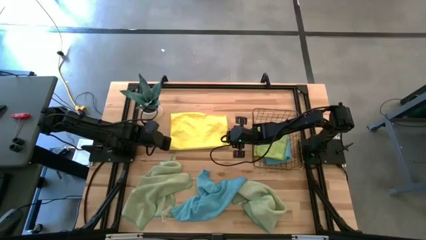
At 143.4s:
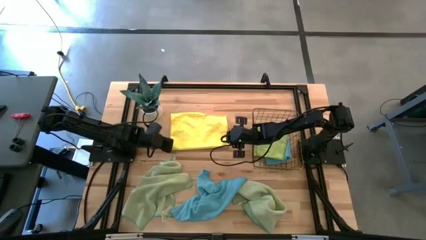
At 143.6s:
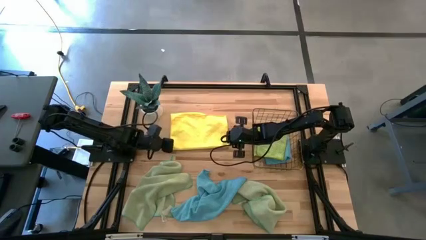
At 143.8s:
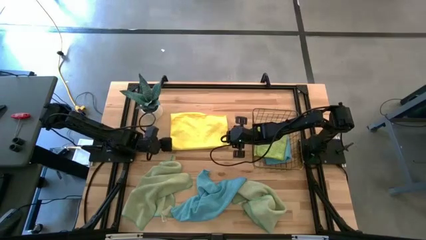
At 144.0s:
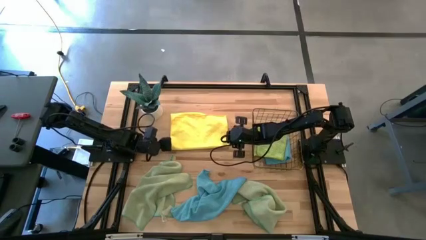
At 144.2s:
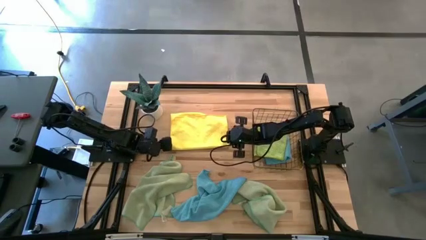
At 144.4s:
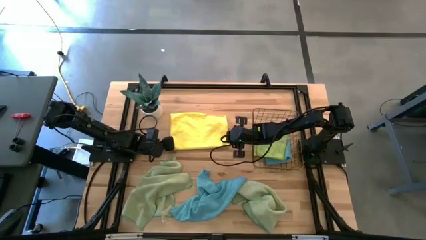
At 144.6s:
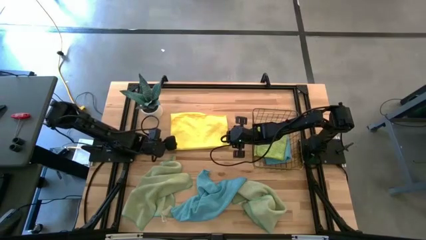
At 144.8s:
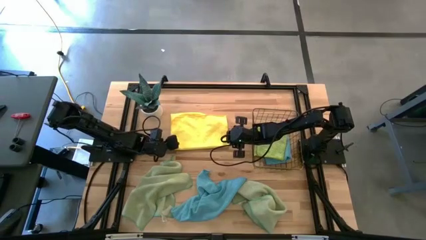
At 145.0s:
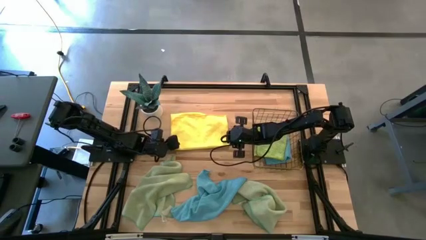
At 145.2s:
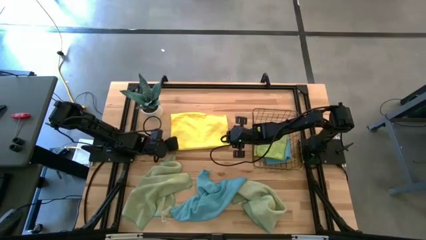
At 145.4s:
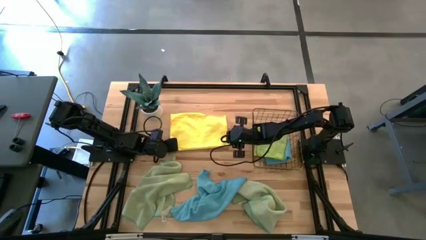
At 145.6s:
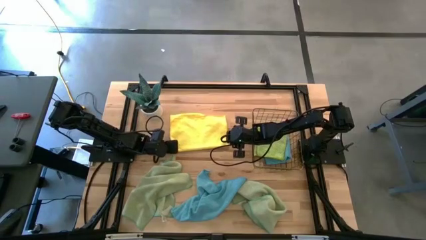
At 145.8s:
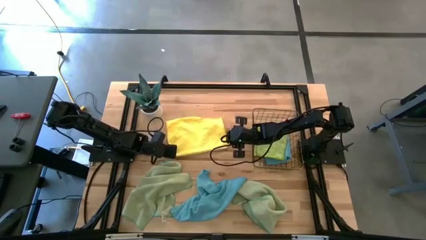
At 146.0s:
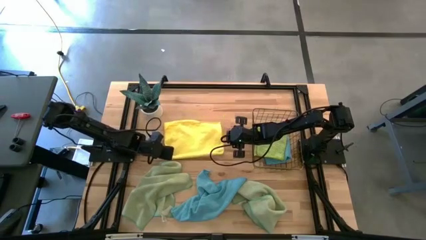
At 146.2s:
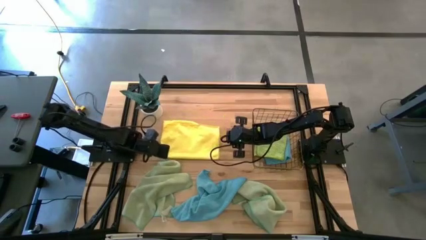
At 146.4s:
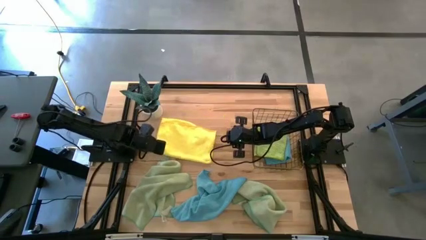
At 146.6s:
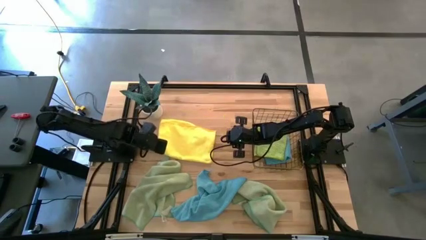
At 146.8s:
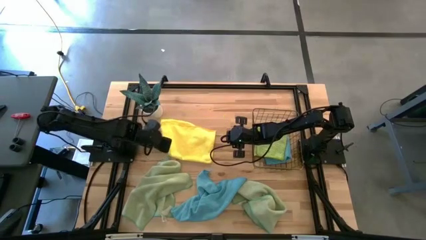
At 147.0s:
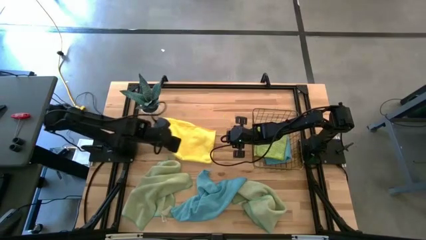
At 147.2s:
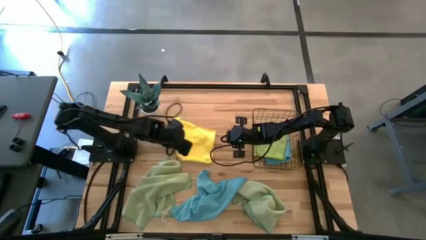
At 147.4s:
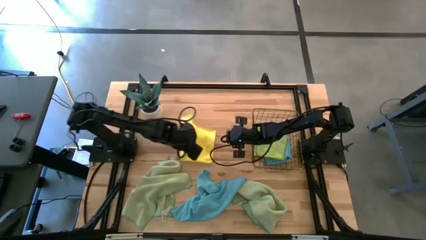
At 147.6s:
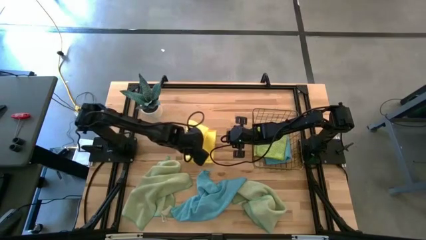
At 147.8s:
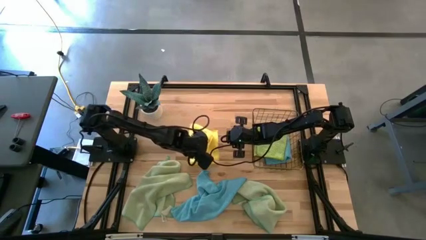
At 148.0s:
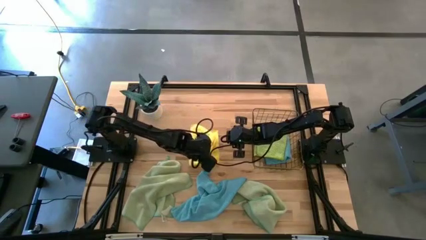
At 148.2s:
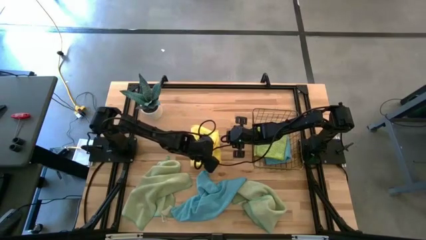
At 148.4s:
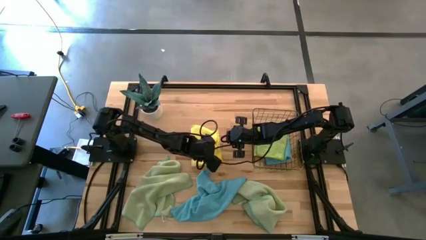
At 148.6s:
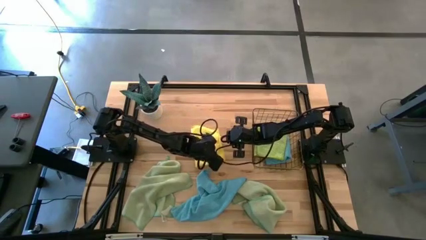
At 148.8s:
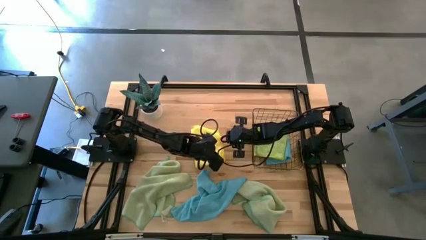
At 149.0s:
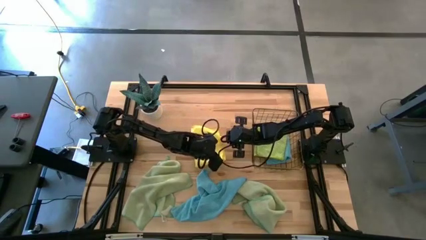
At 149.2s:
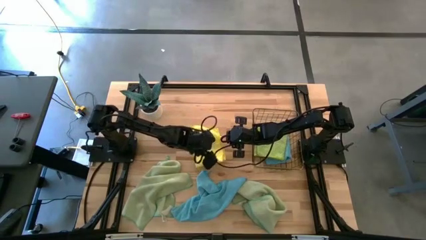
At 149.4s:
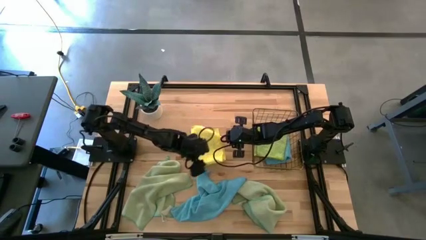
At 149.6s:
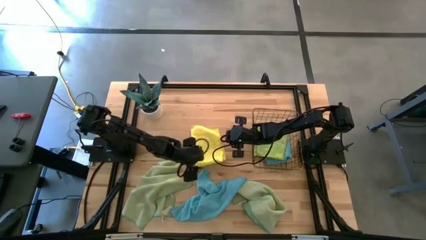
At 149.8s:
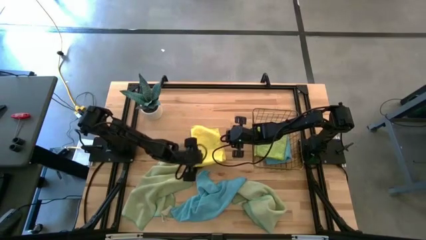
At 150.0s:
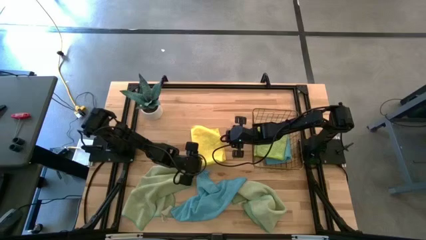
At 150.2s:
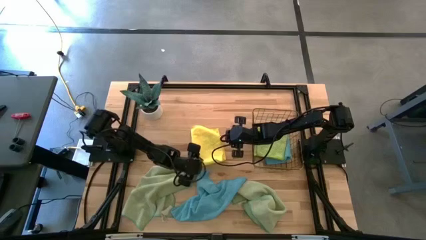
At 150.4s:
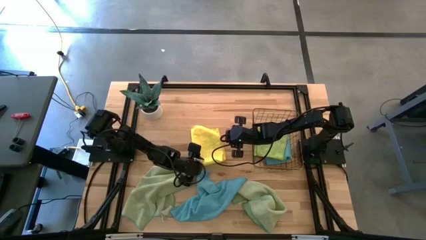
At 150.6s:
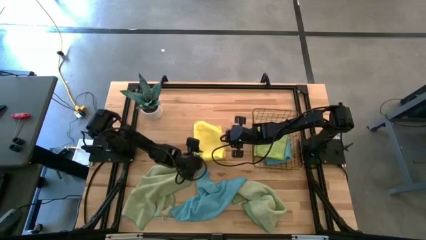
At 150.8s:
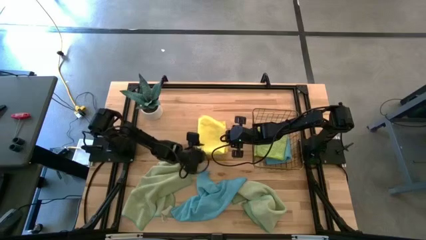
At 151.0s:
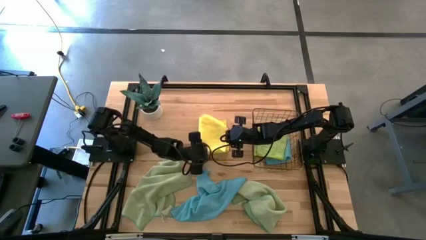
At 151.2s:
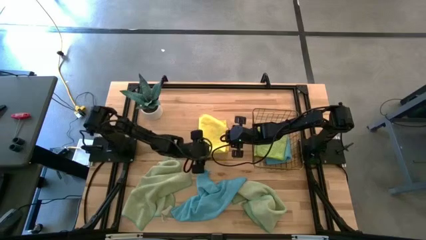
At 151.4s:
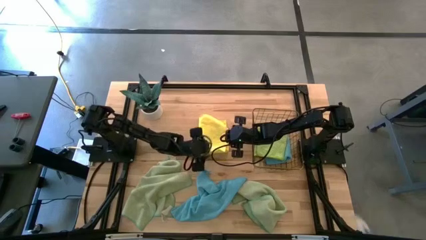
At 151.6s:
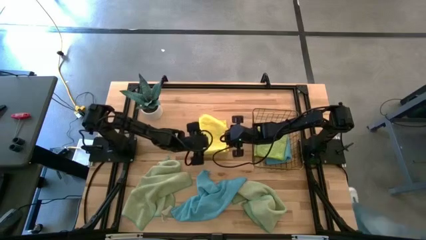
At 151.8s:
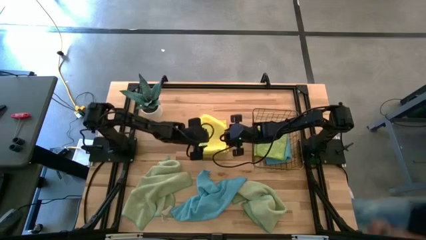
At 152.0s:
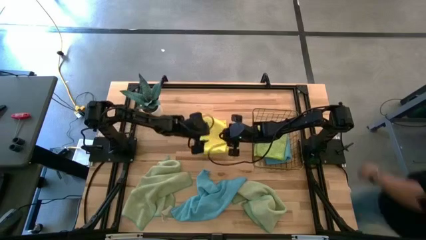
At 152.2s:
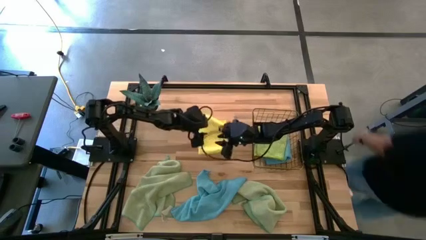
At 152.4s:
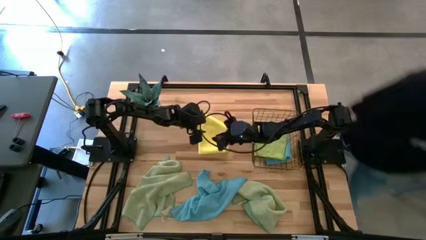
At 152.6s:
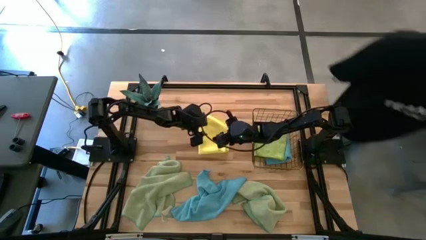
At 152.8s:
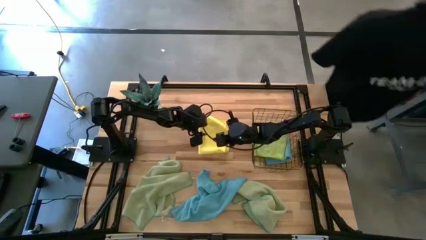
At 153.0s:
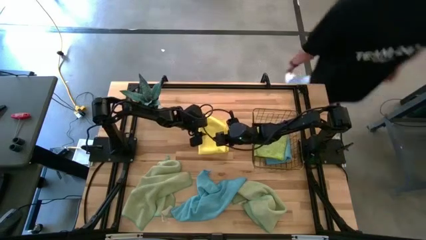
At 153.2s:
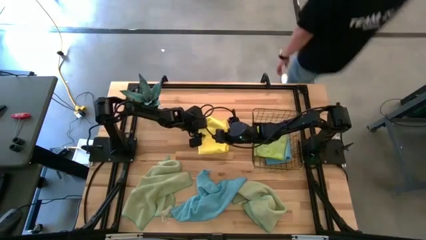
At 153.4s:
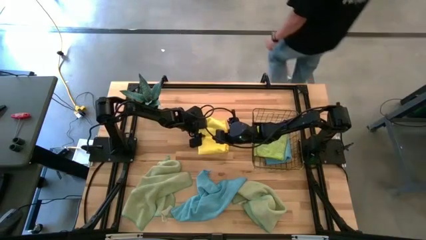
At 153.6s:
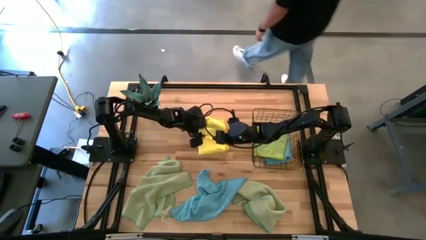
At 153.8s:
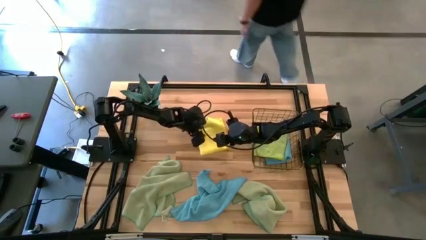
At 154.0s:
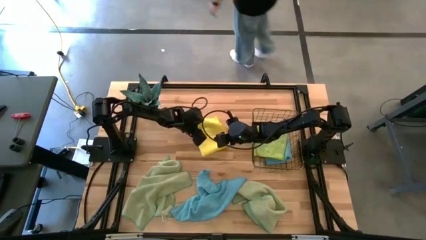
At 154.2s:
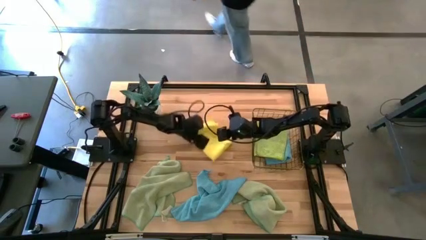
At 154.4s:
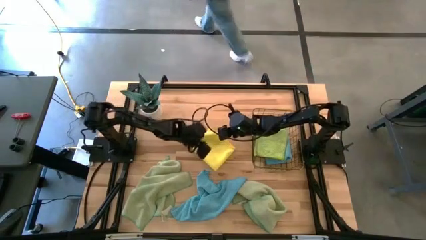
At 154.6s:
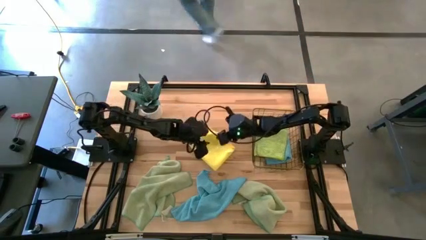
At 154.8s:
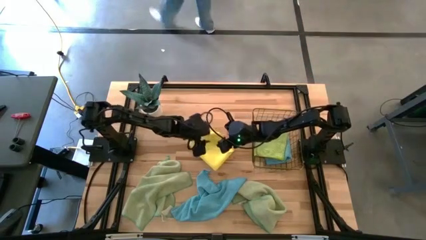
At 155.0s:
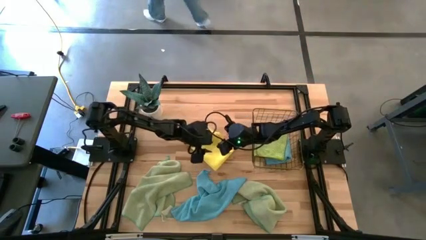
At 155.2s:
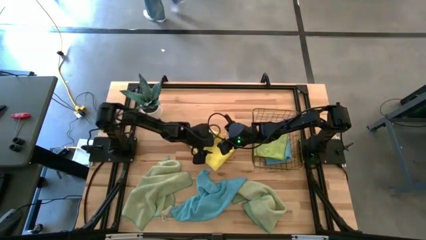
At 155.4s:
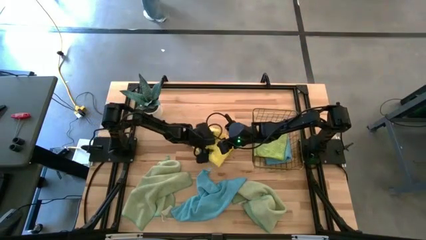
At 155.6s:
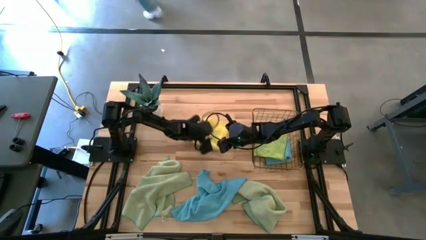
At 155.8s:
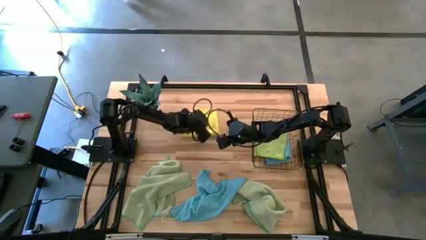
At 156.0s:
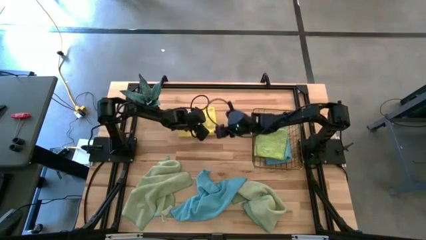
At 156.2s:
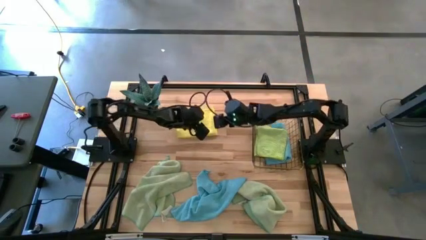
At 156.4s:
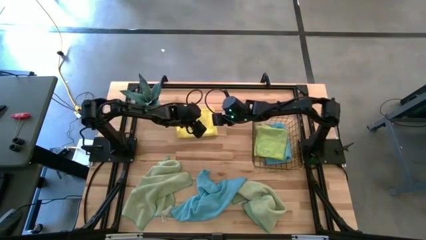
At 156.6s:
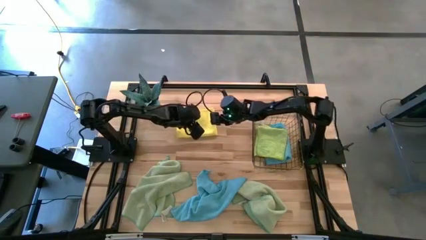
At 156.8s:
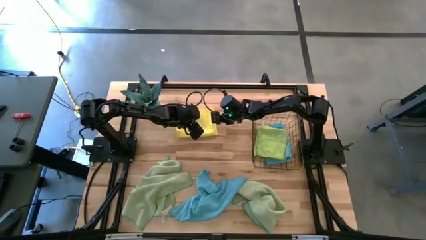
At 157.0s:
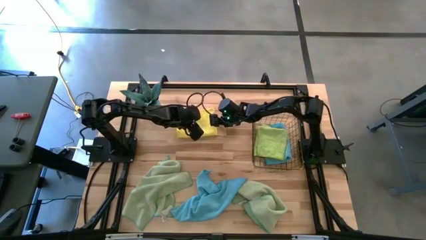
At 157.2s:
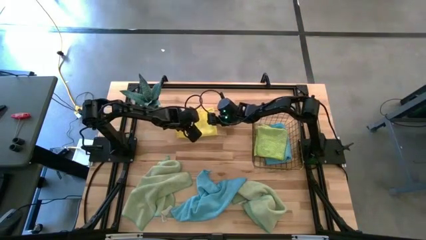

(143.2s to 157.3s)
Task: Fold microfiber towels
Fold the yellow microfiber cloth

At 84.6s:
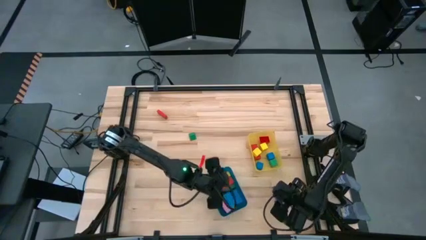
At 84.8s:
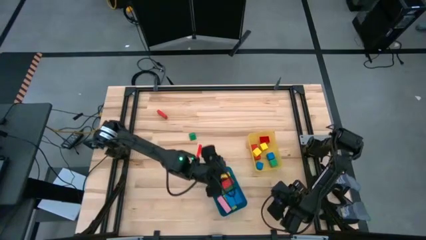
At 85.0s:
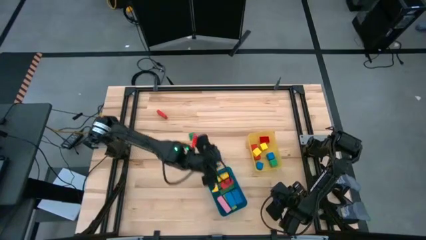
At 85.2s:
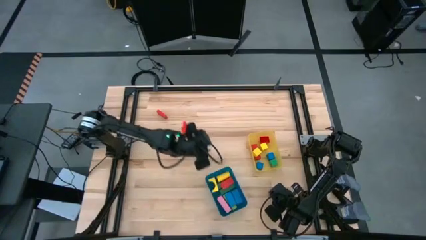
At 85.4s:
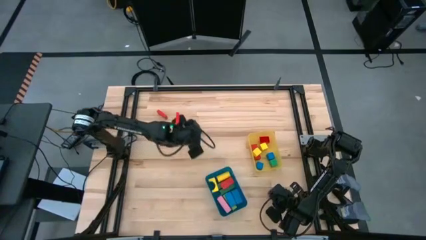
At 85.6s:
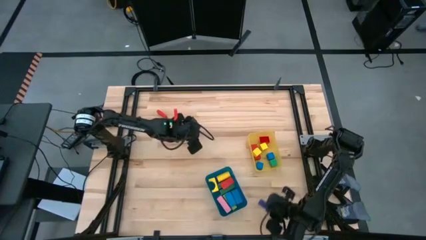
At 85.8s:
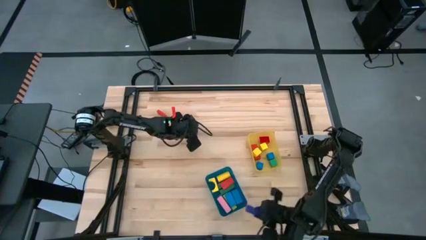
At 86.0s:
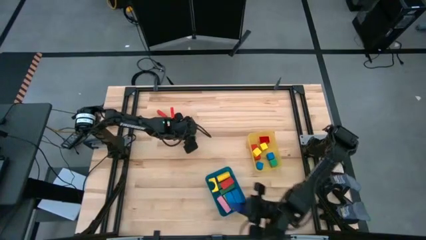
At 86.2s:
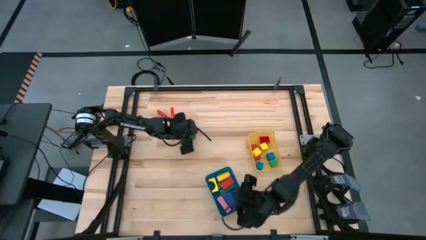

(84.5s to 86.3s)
Task: Sort blocks by size
Put the large blue block into the blue bin
